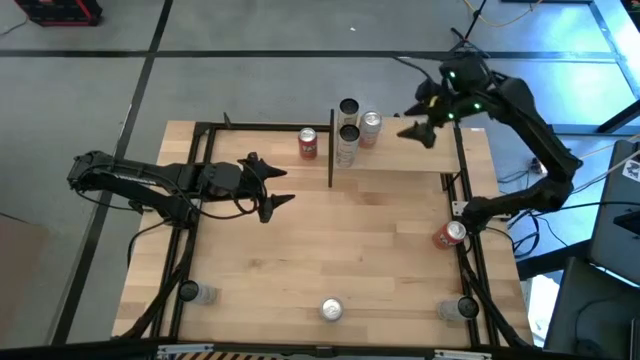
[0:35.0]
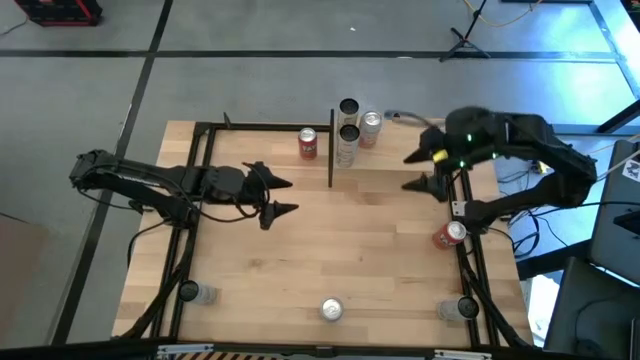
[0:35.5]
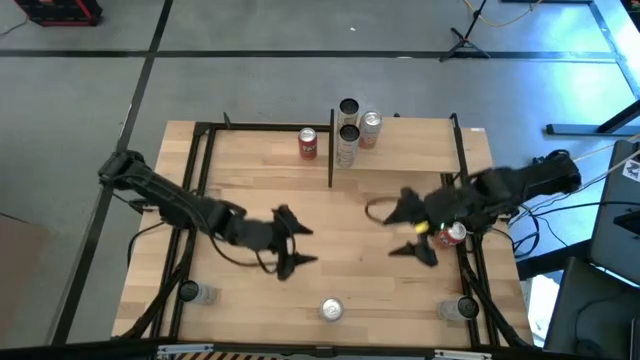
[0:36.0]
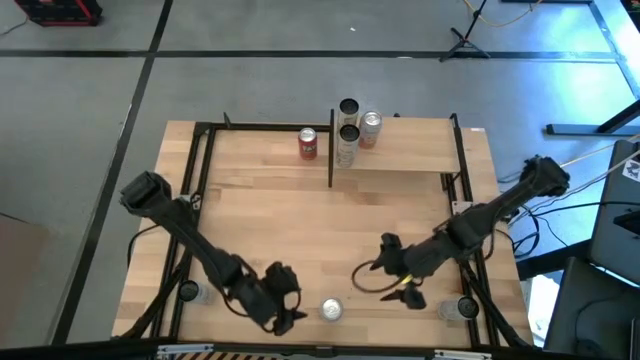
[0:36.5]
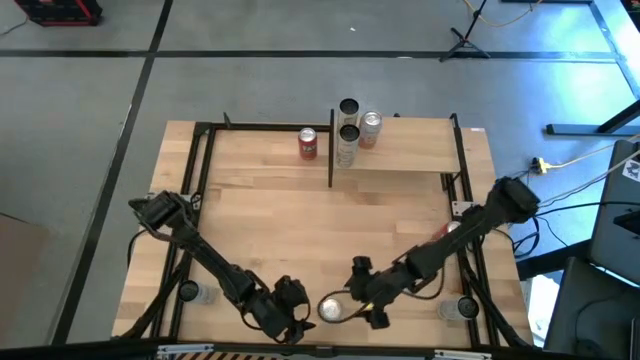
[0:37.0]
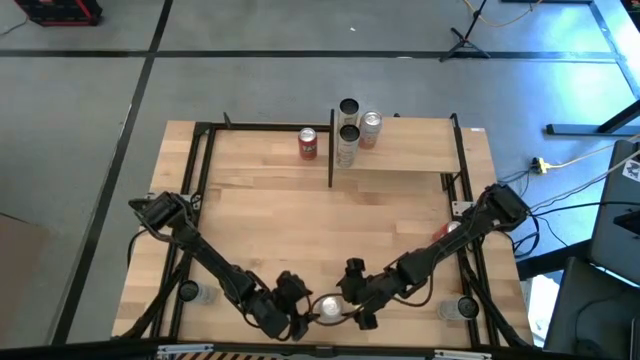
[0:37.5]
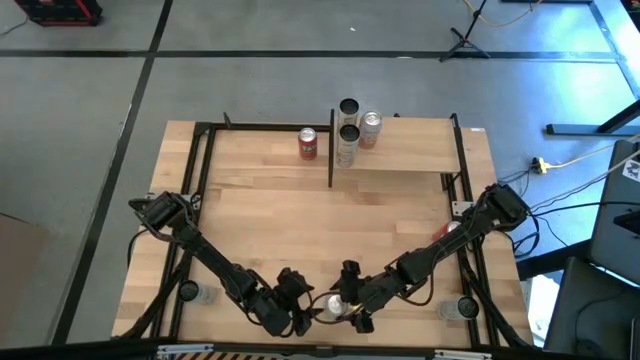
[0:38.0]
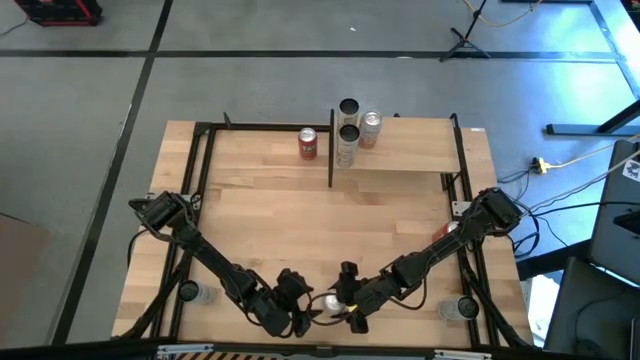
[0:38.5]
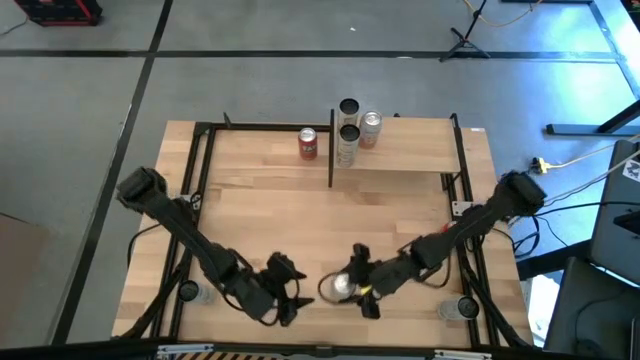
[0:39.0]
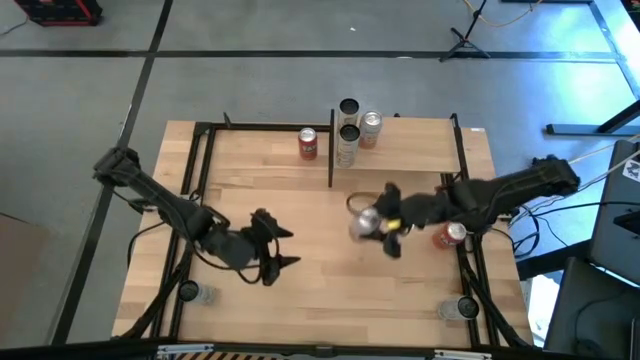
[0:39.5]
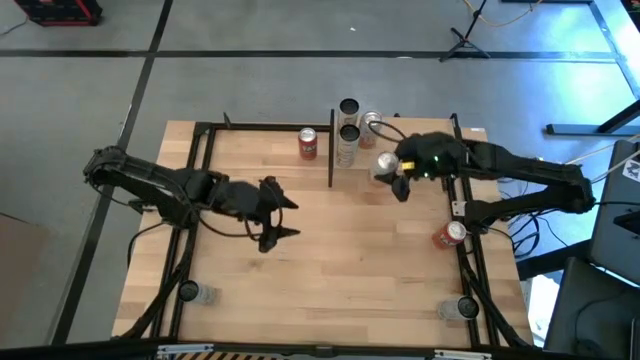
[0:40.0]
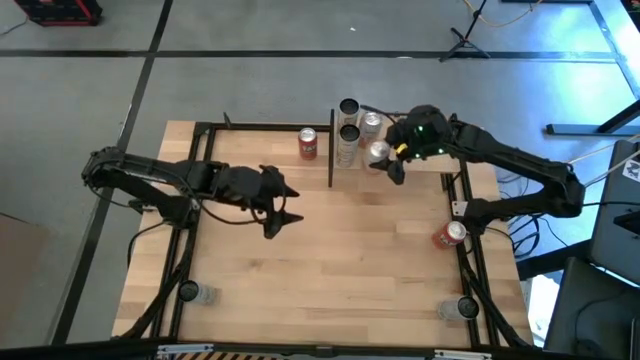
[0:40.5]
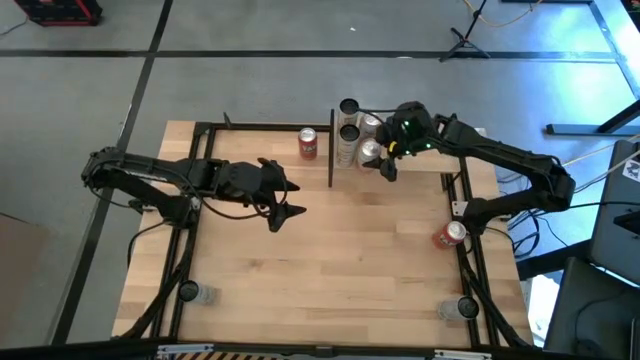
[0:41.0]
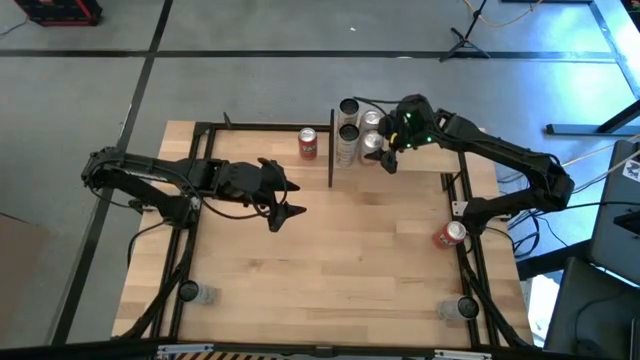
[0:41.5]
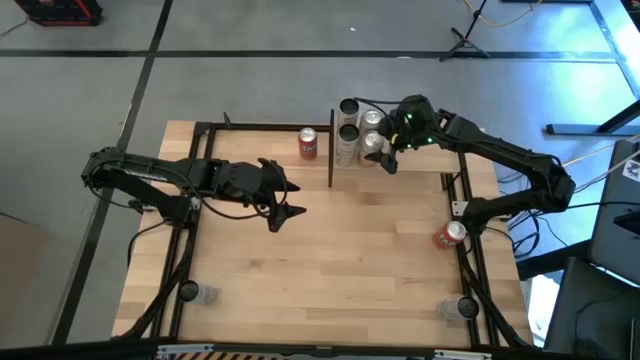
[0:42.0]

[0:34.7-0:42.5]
Task: Place canned beverage on shelf
Put the white soda can onto the shelf

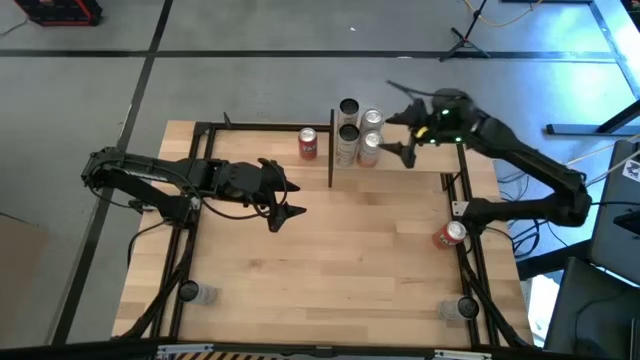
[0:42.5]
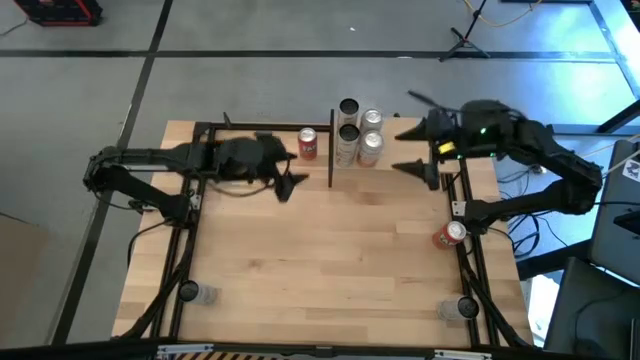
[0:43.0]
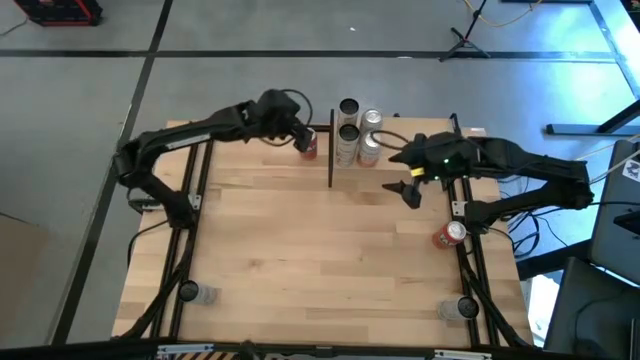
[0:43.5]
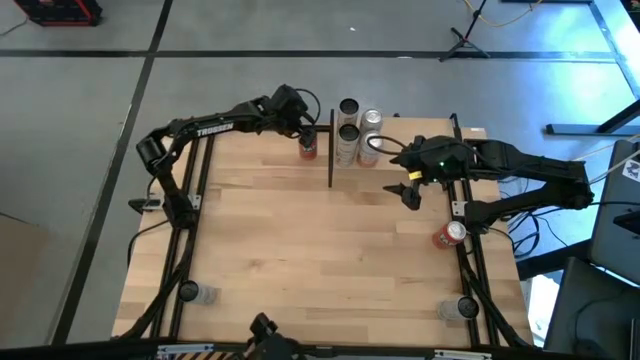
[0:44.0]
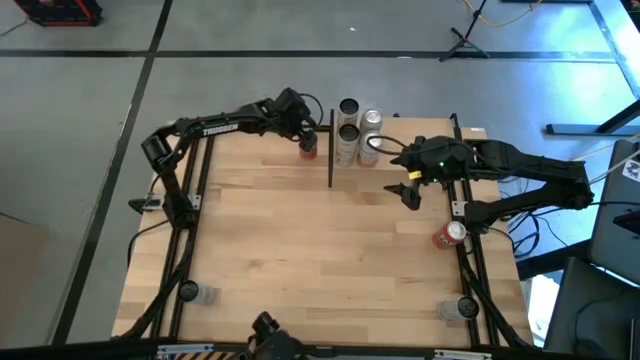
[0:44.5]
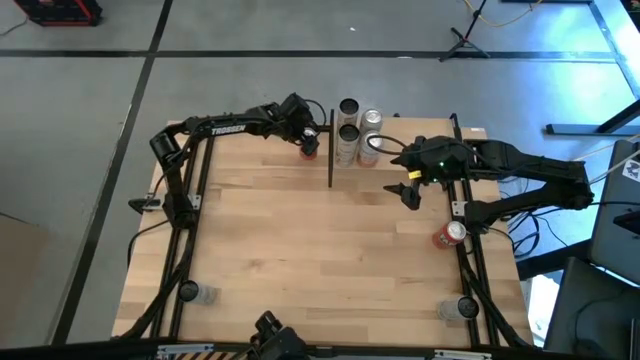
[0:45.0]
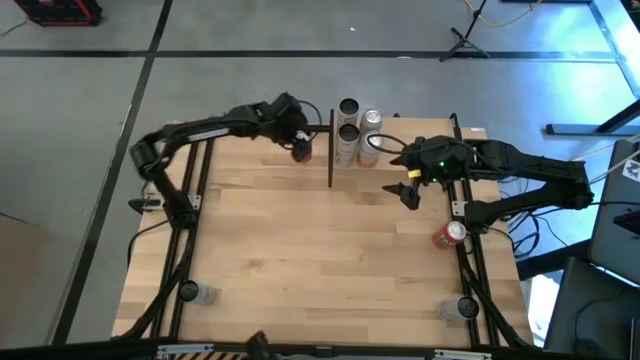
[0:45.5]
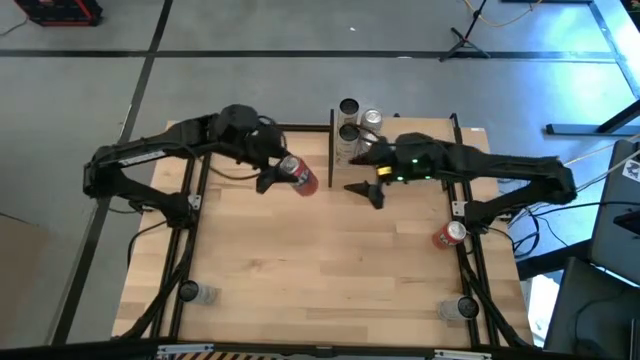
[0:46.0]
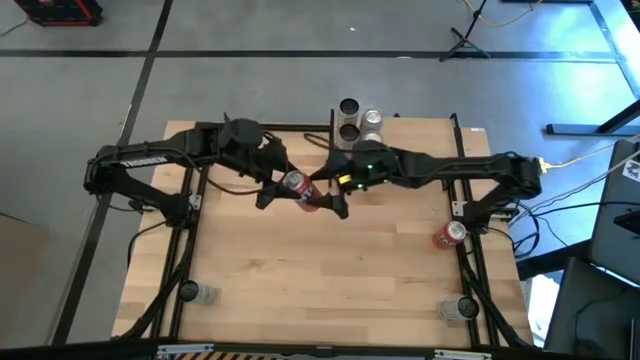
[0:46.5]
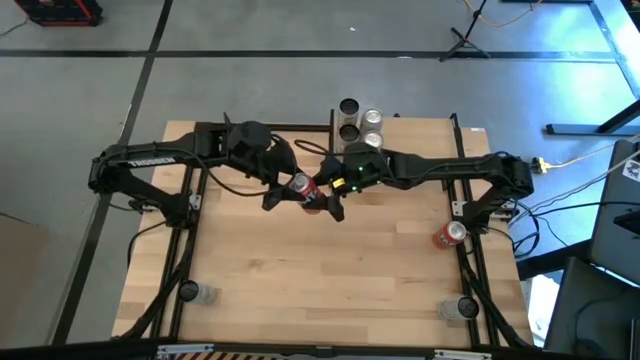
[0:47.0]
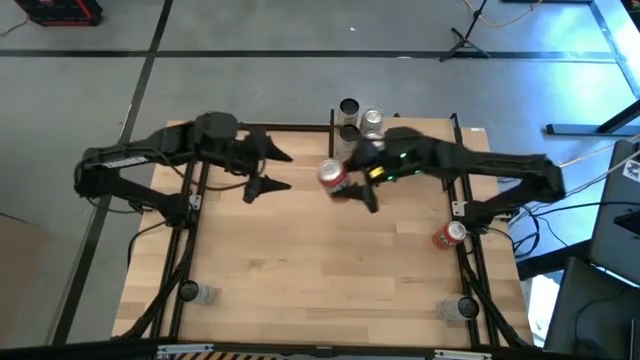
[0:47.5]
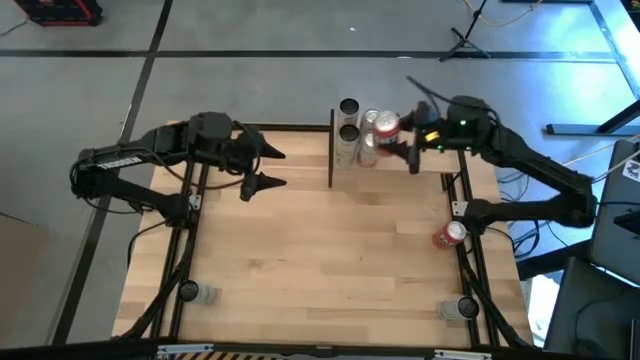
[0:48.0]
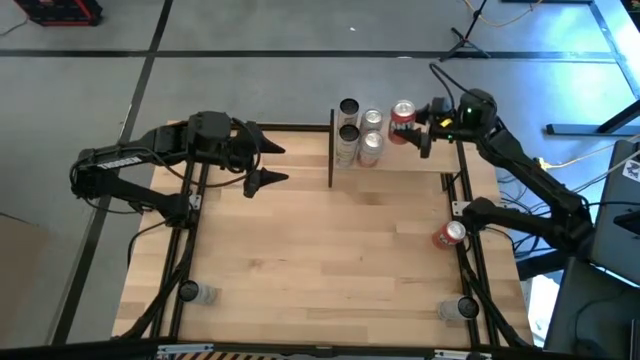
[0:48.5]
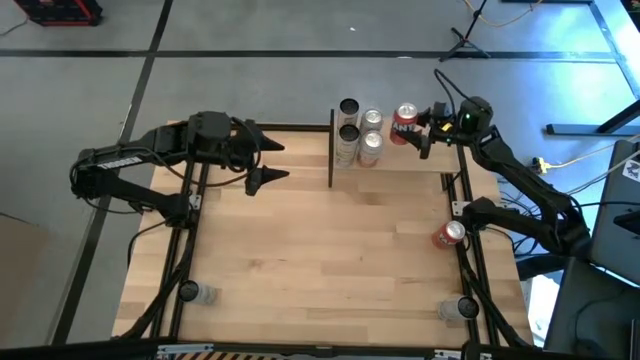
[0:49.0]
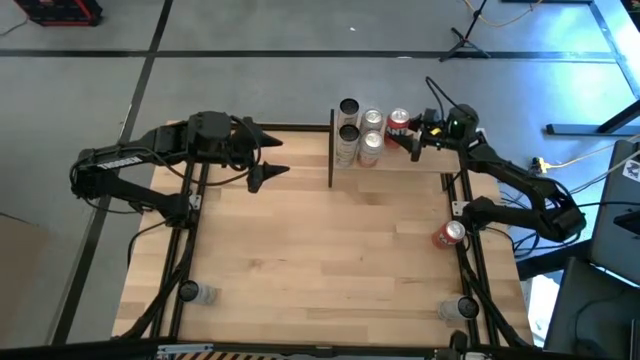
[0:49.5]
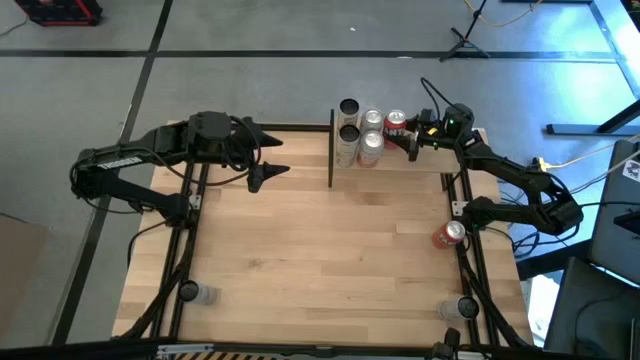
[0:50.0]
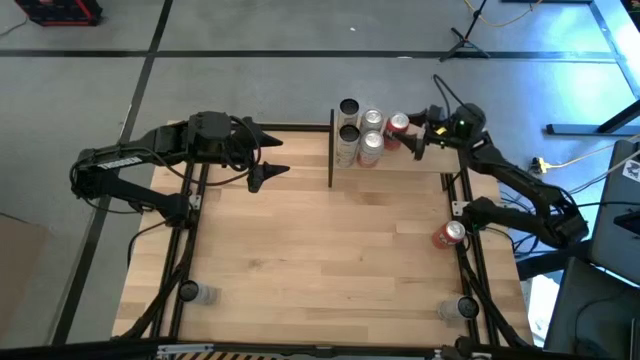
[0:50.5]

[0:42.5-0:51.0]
Put the top orange soda can onto the shelf

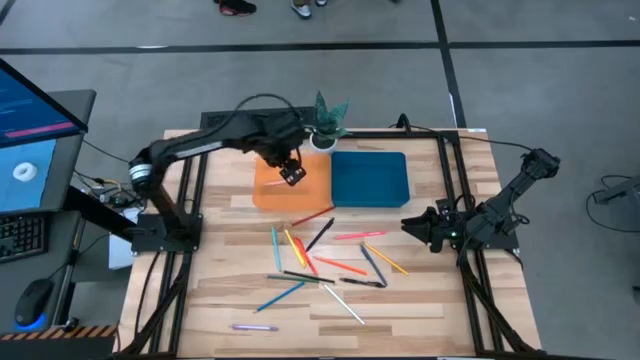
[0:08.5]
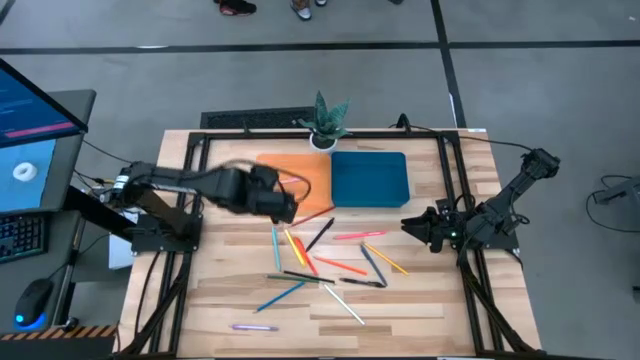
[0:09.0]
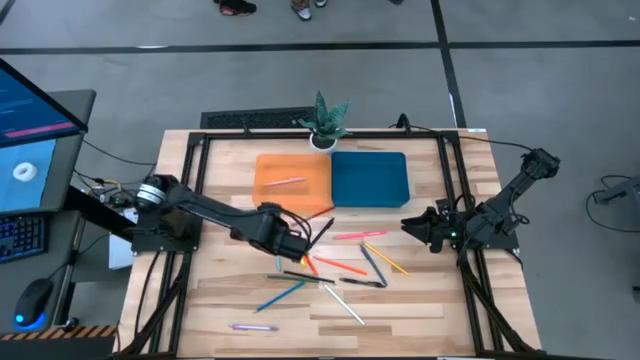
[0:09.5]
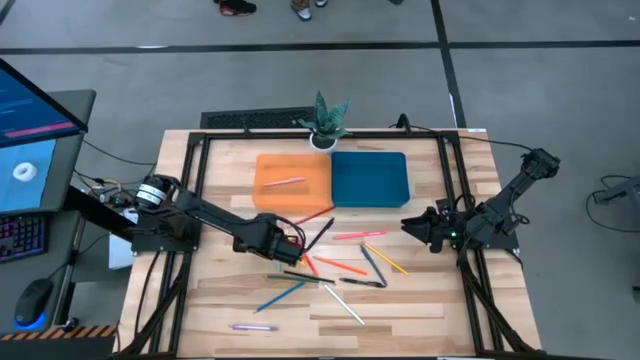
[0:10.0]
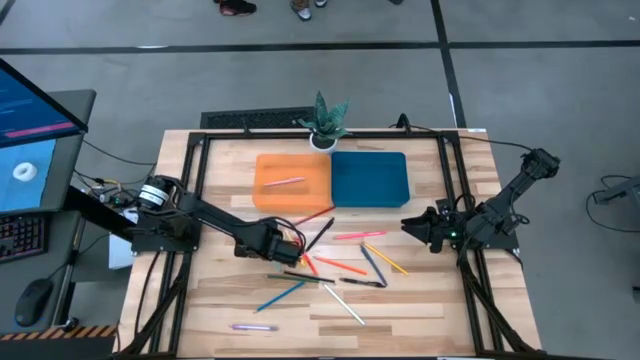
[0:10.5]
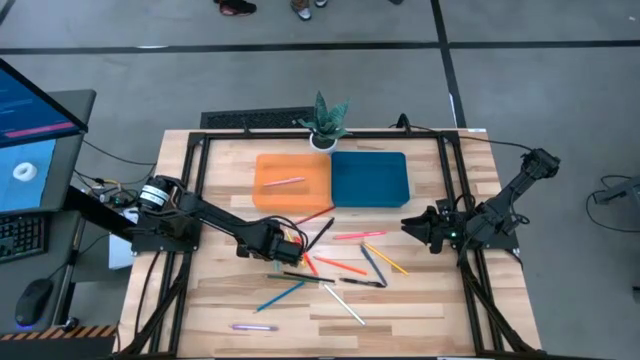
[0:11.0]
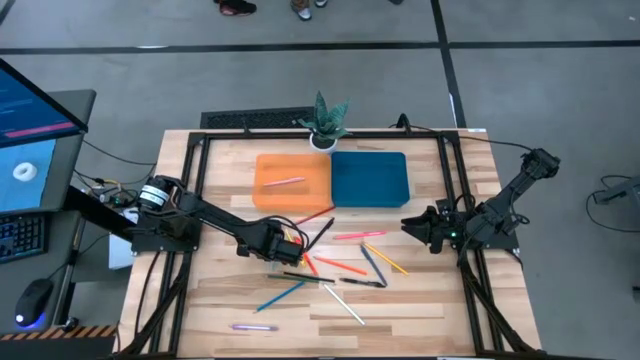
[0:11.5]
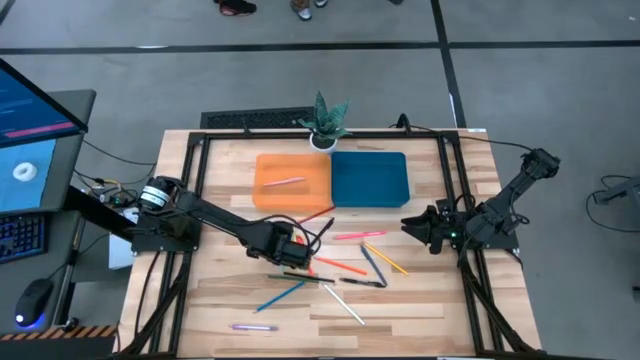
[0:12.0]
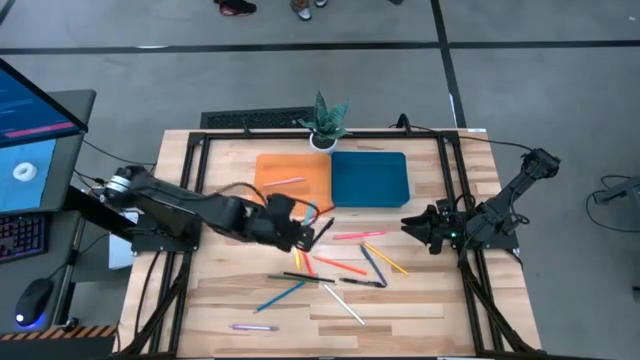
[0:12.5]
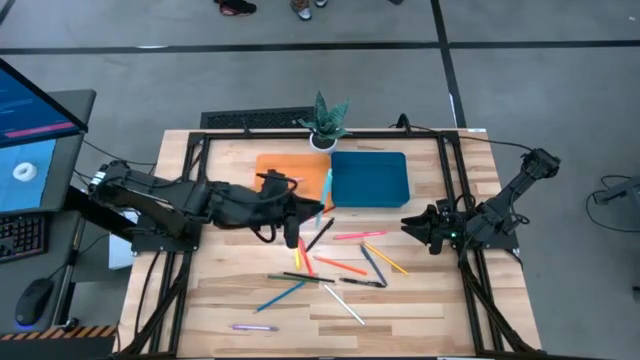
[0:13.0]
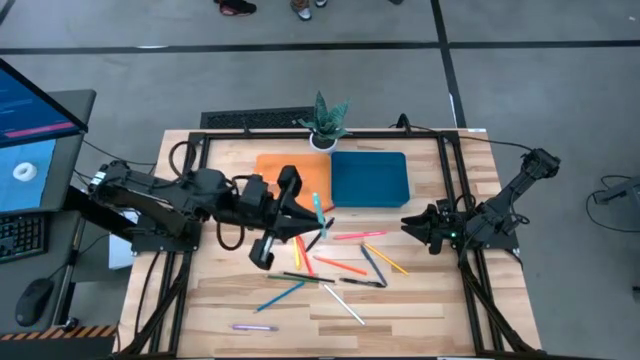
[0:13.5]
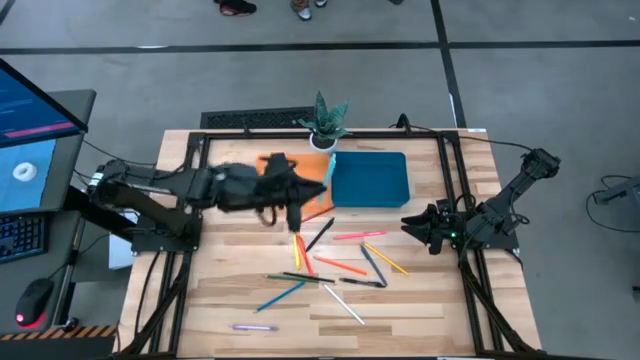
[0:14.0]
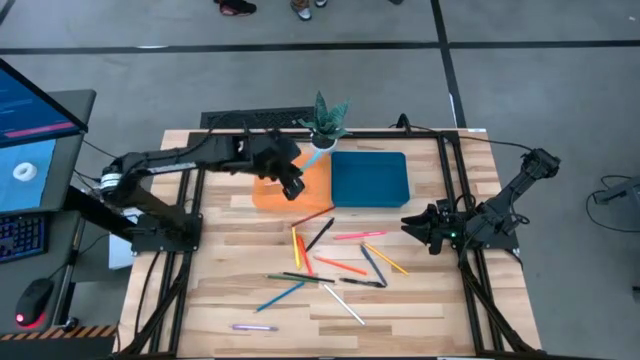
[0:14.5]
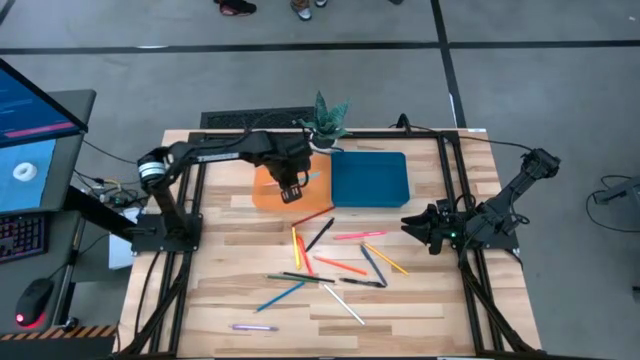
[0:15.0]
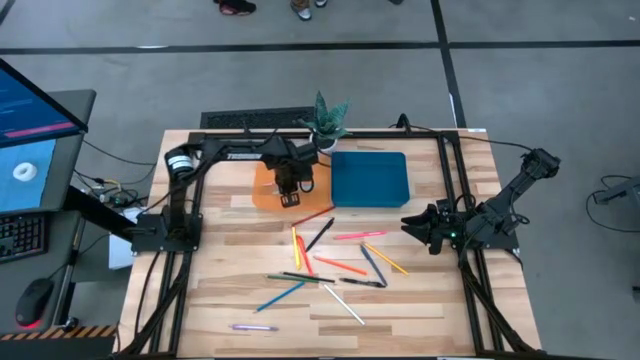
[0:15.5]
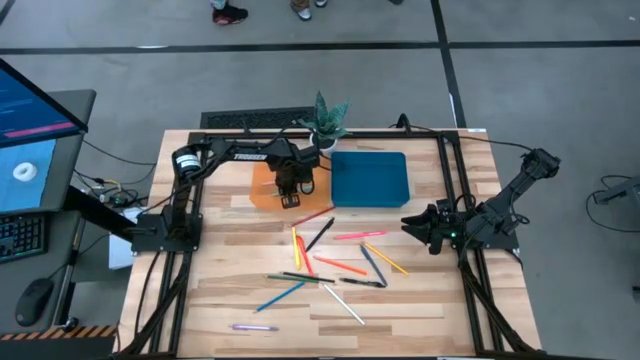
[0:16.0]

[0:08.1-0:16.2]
Task: Sort pens & pencils
Put the light blue pen into the orange bin
